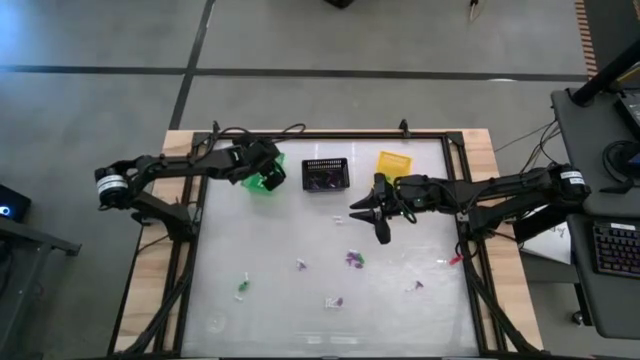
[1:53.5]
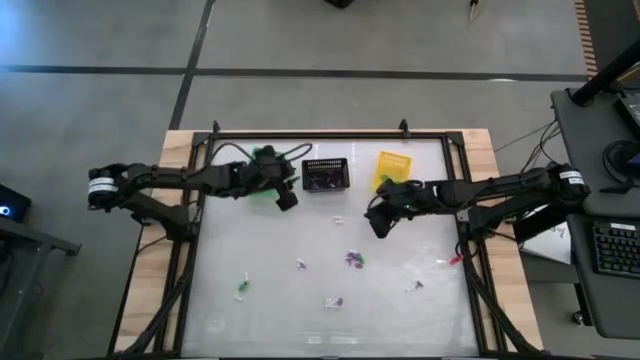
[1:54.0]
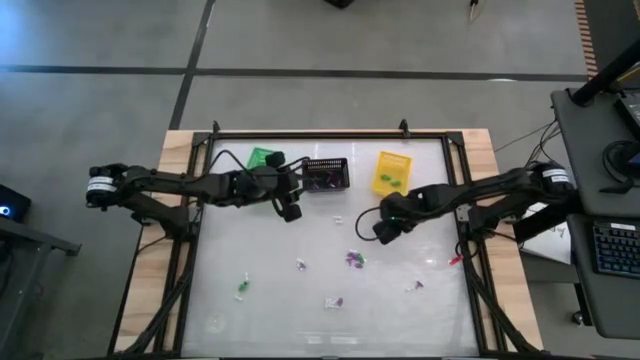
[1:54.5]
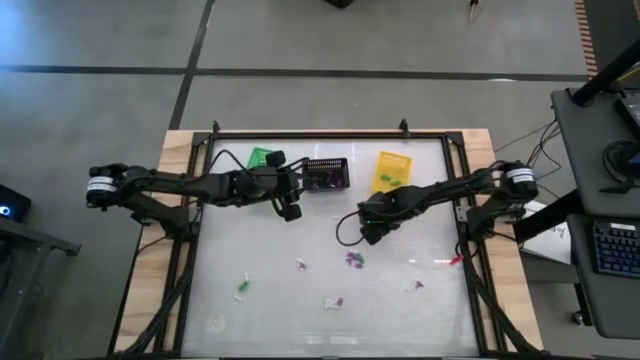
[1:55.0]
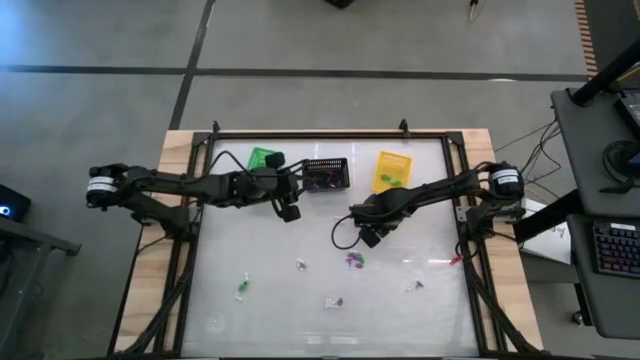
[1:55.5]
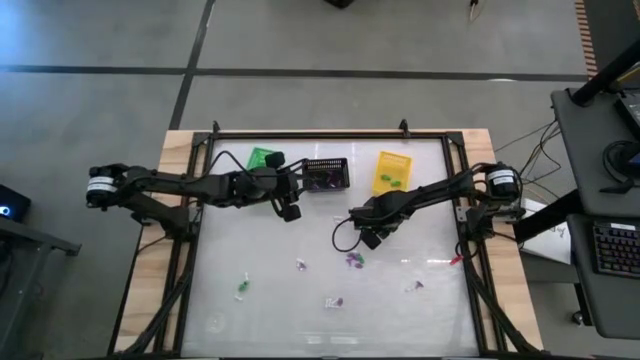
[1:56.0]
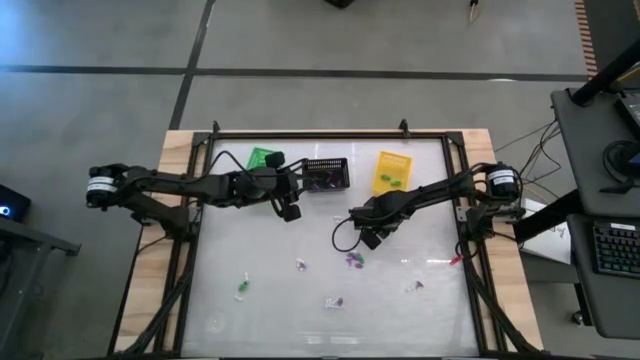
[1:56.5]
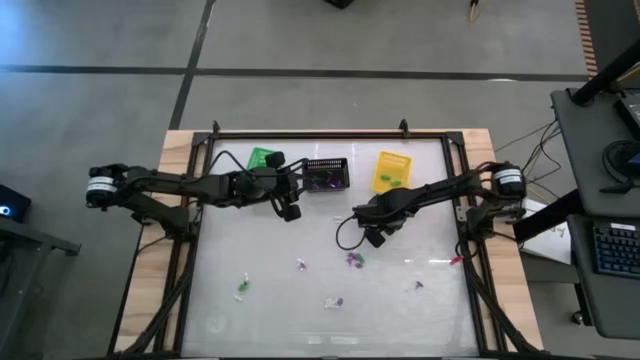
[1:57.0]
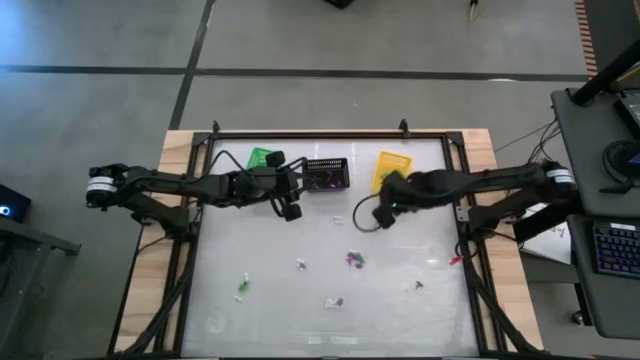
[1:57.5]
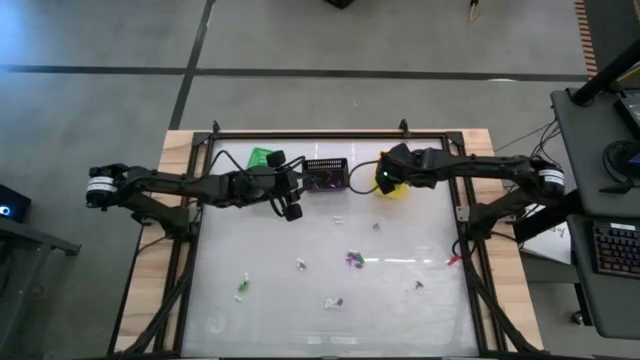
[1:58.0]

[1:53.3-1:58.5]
Task: Sort Halloween decoration
Put the green skeleton toy into the yellow basket

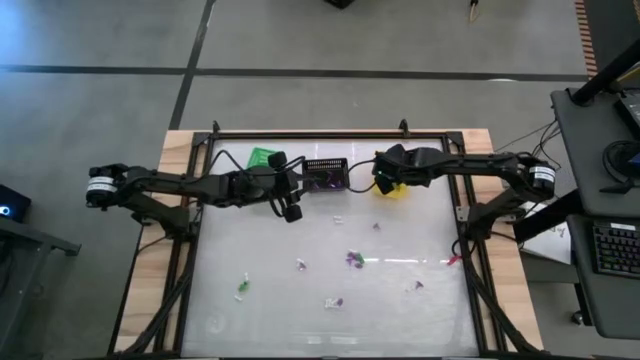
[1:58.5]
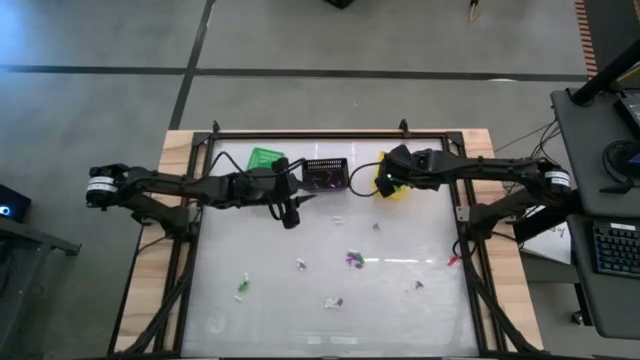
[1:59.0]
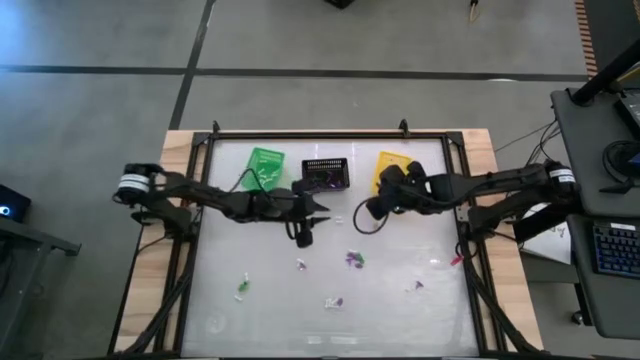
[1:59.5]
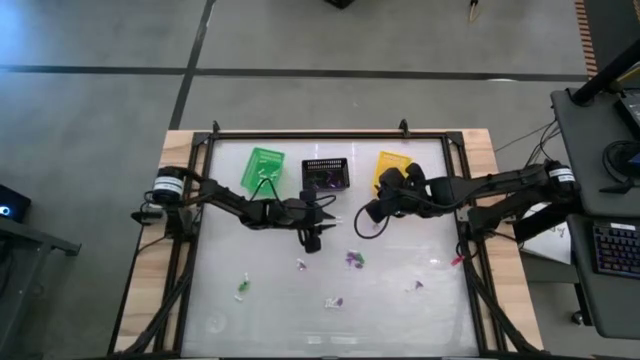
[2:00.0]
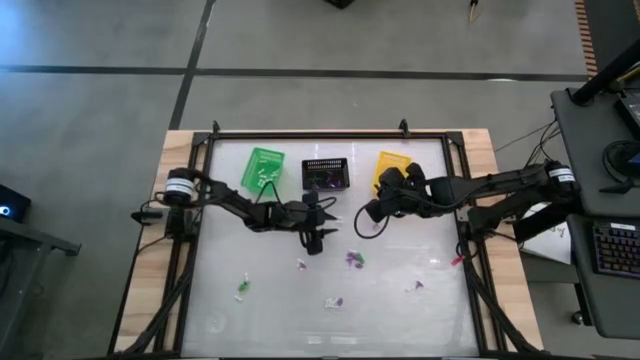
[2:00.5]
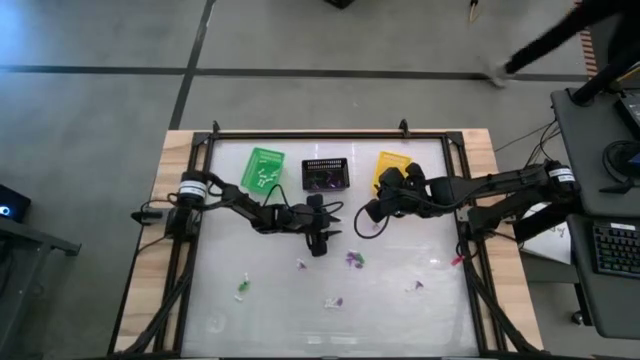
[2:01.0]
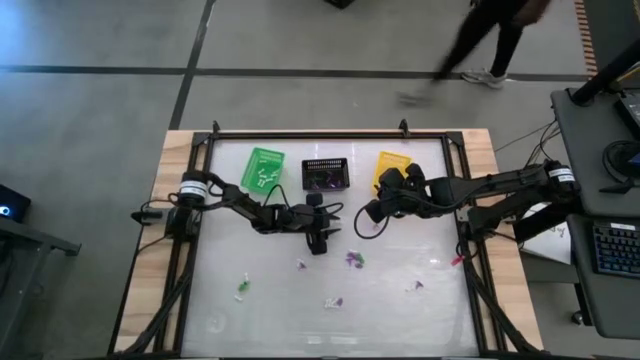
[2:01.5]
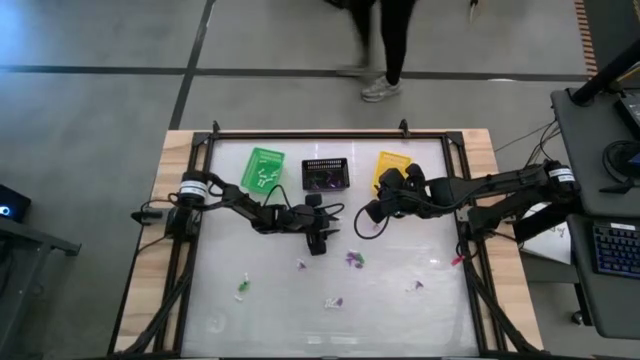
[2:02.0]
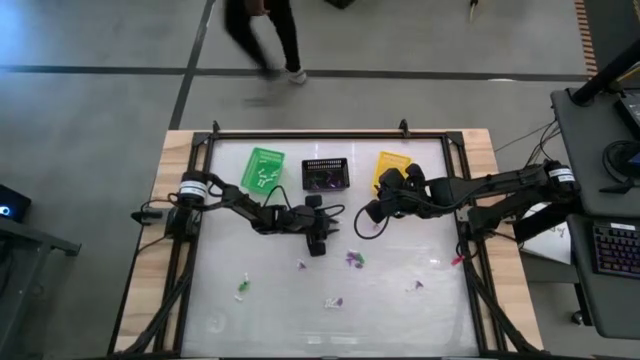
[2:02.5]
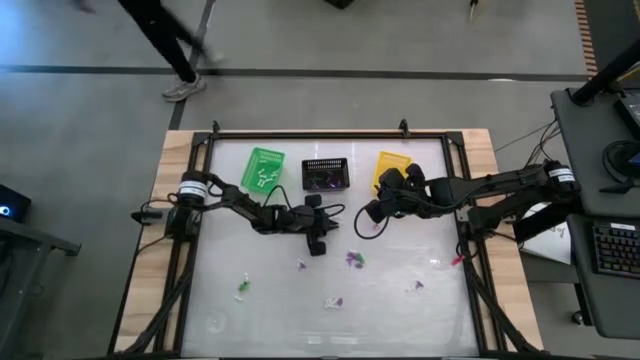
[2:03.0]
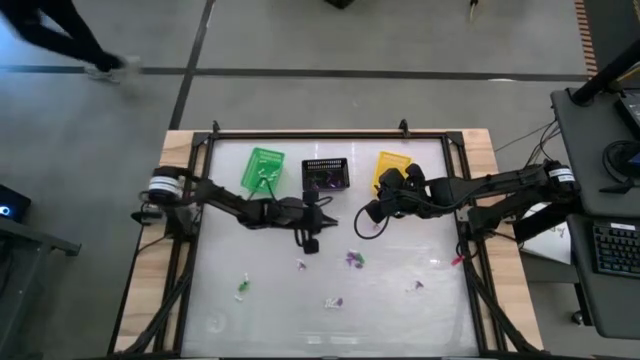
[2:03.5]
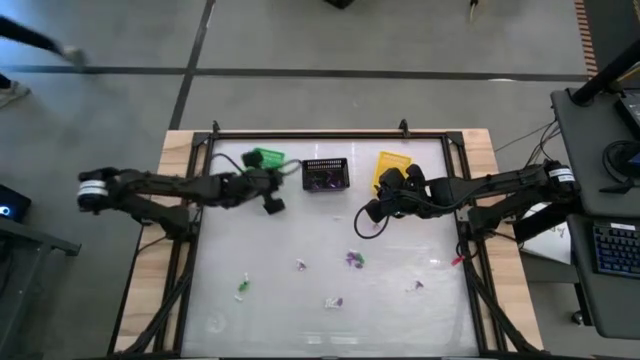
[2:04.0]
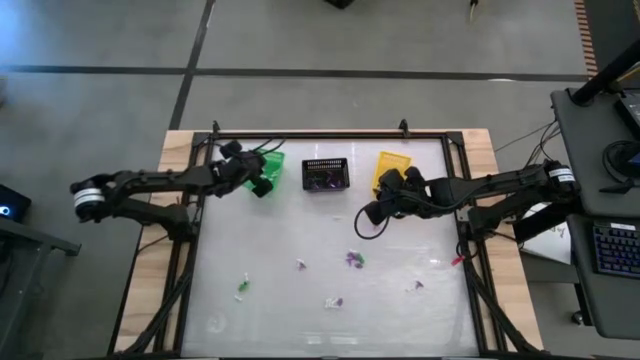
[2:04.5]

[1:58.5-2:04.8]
Put the white bone toy into the green basket

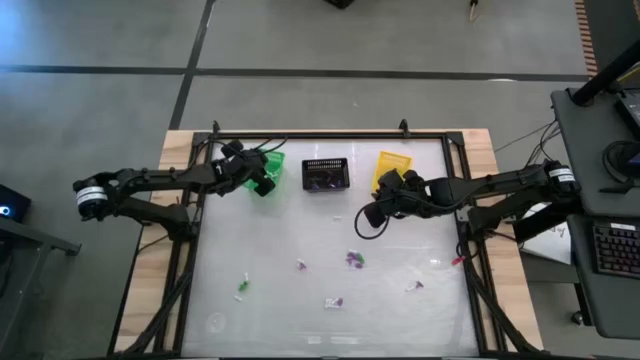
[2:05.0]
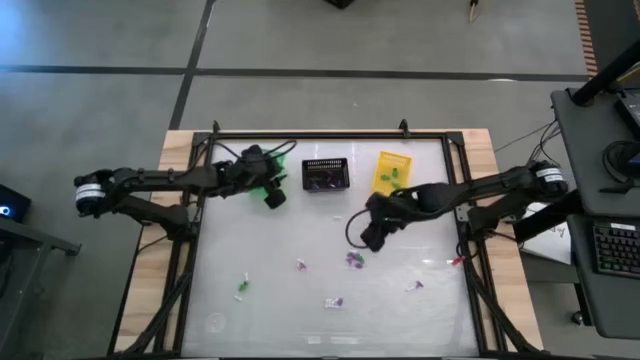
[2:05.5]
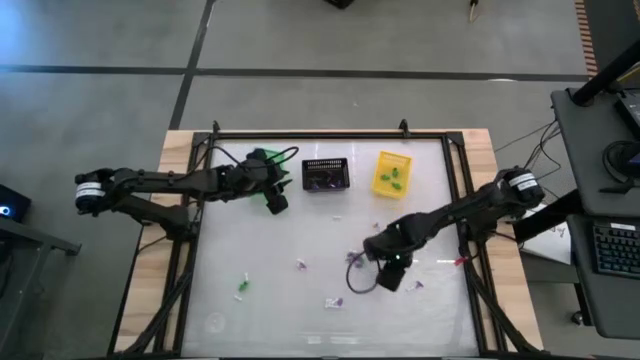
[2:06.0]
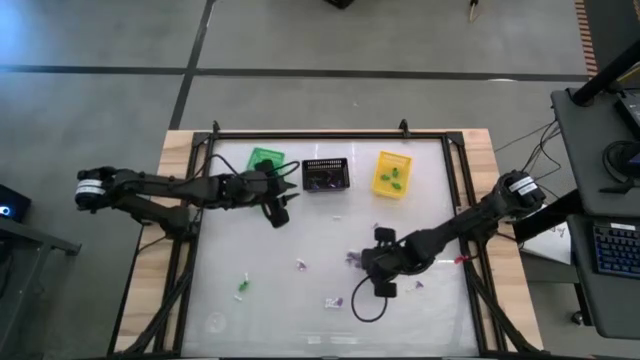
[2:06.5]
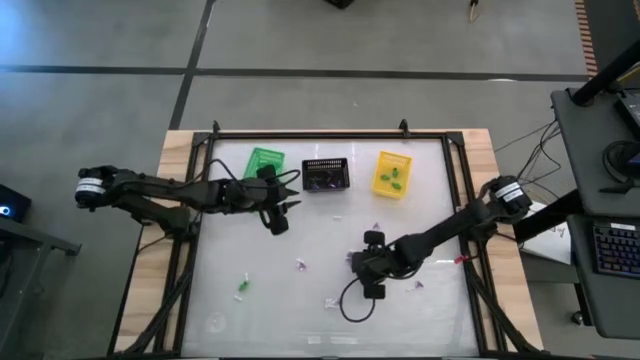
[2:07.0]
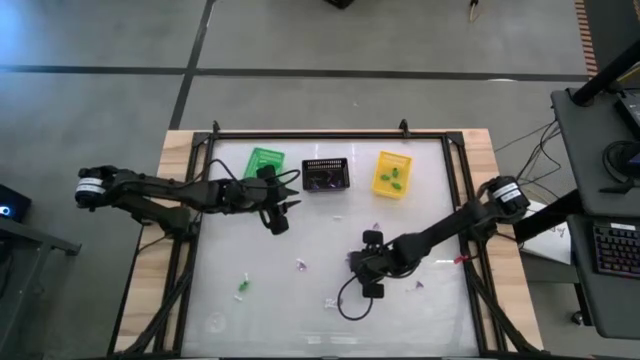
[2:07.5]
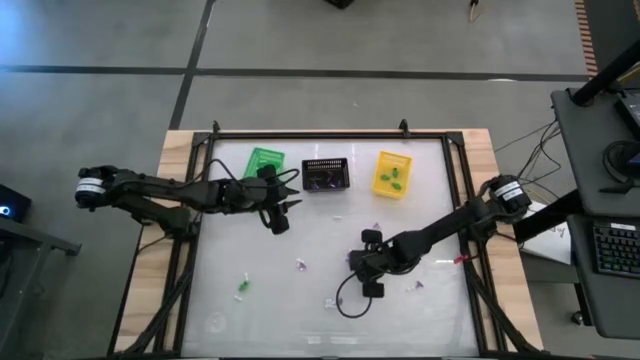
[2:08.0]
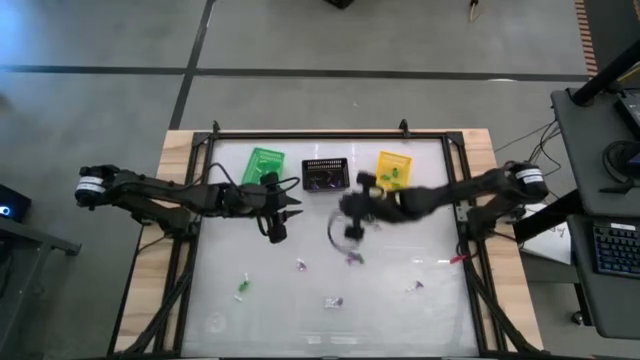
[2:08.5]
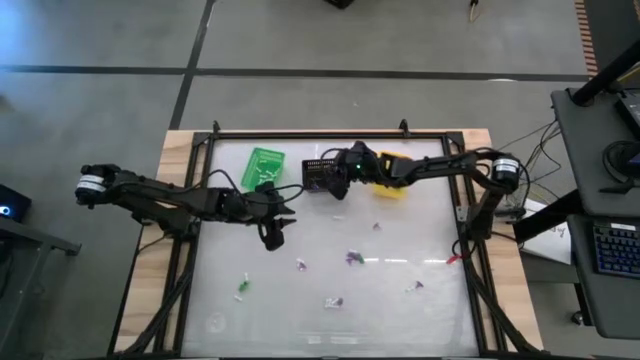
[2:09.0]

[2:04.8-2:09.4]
Put the purple witch hat toy into the black basket

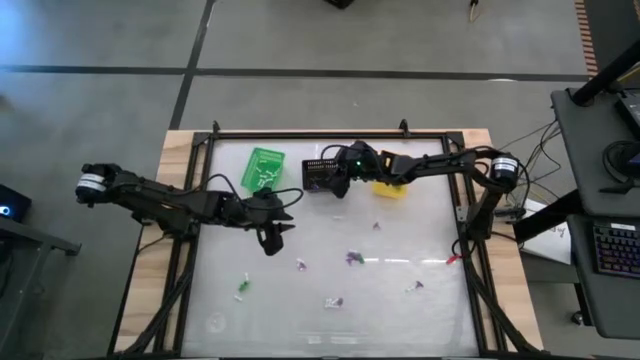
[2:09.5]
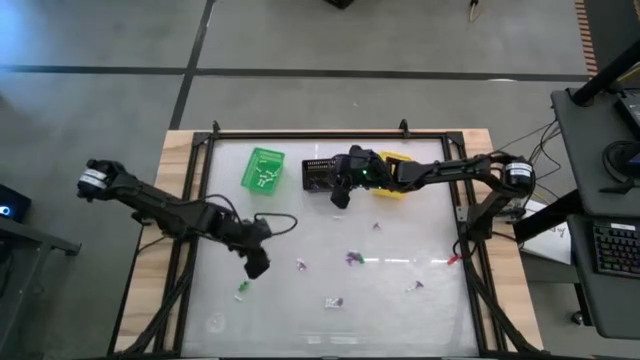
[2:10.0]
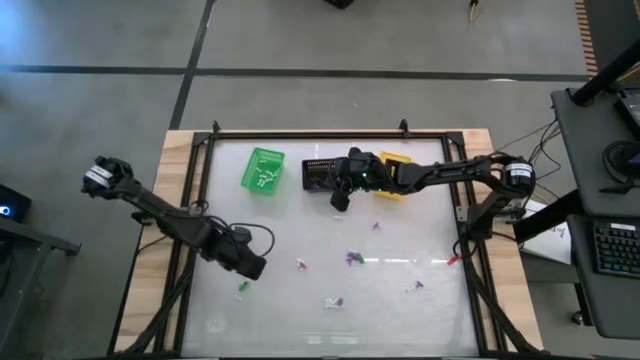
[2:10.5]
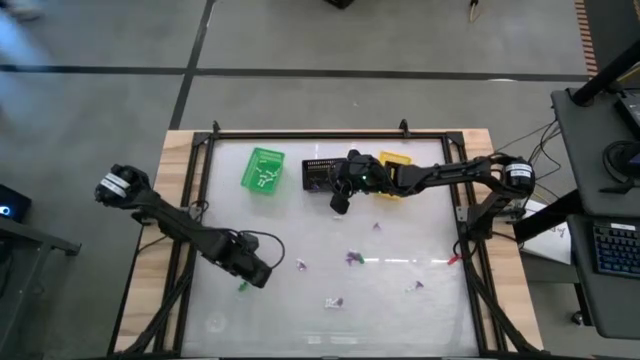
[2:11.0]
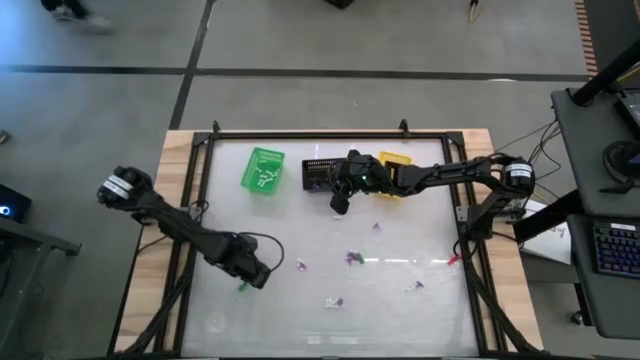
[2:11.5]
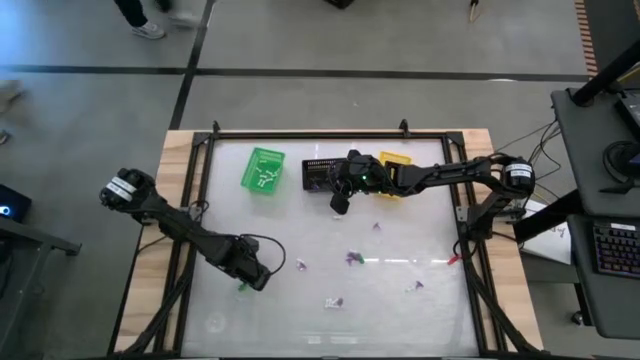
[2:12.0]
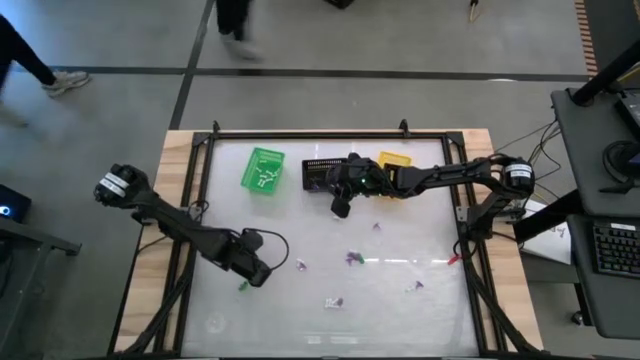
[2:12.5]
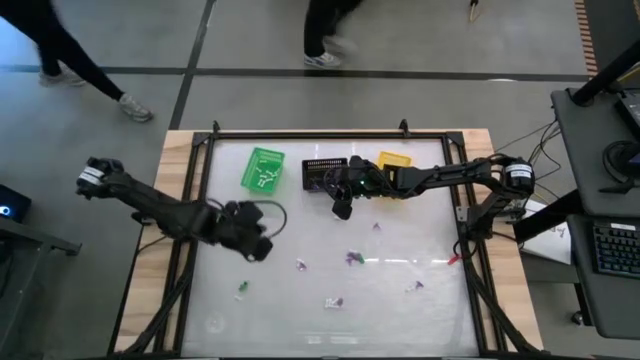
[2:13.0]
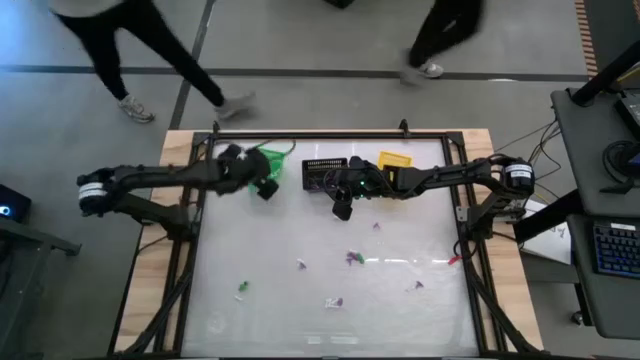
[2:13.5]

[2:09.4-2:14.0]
Put the white bone toy into the green basket

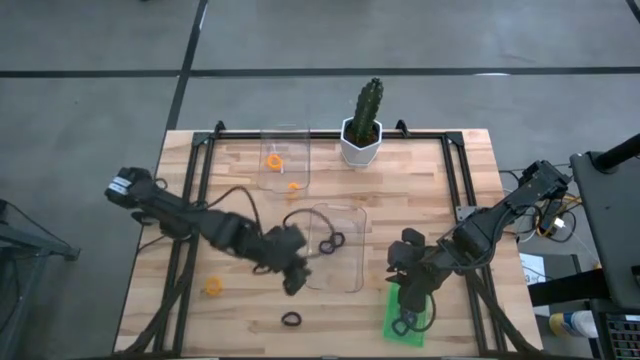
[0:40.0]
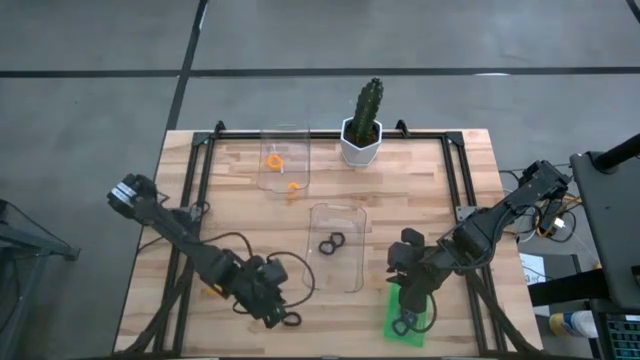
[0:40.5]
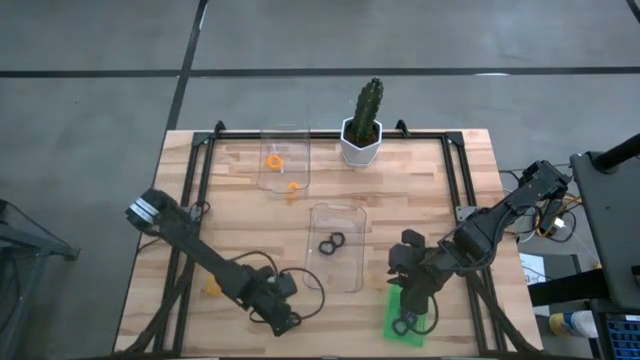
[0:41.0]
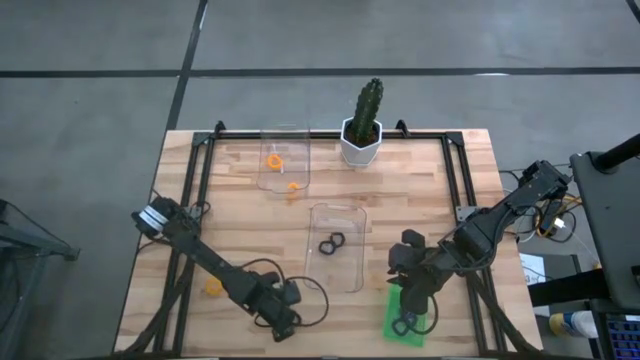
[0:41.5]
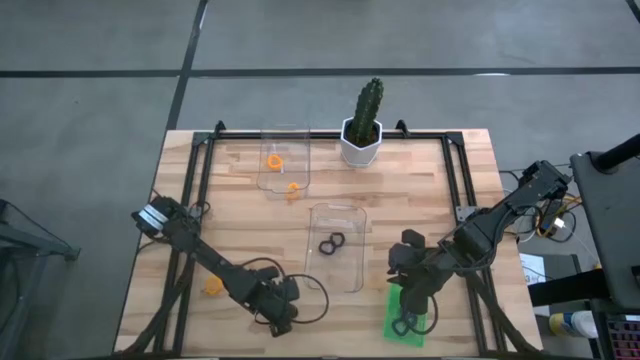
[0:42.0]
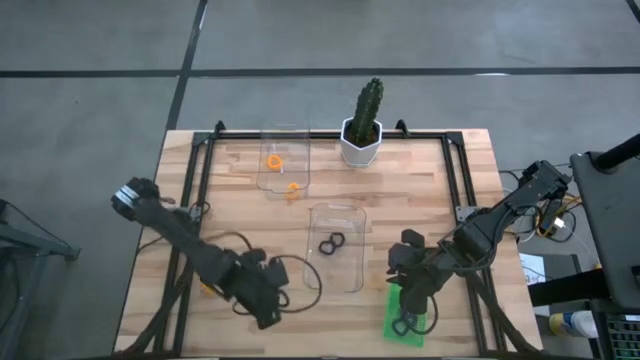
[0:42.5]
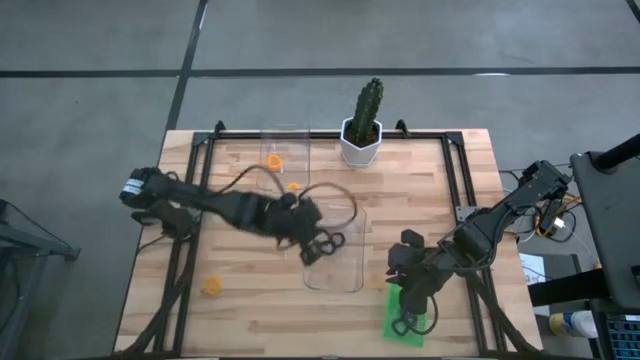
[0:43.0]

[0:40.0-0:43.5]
Task: Sort spring keychains
Put the black spring keychain into the bottom transparent bin
